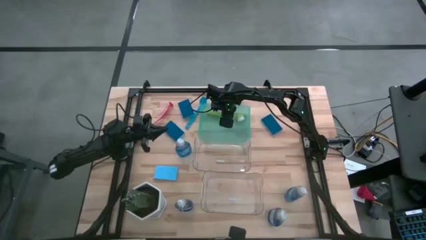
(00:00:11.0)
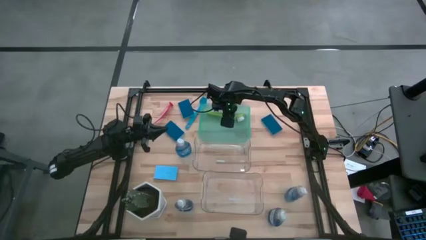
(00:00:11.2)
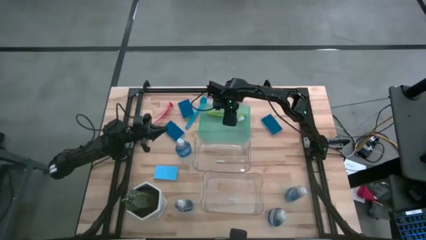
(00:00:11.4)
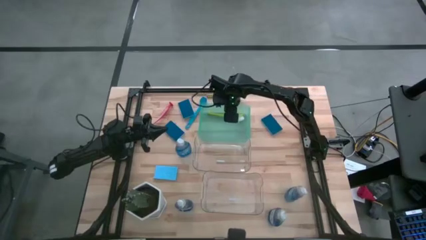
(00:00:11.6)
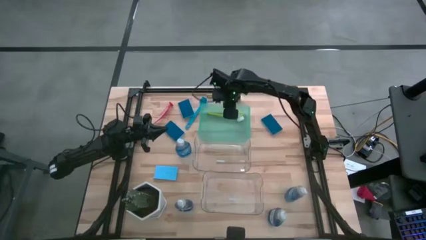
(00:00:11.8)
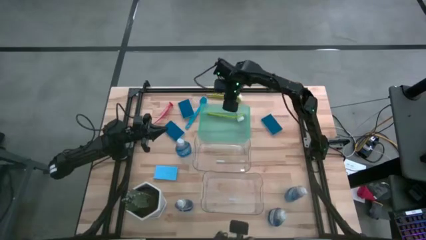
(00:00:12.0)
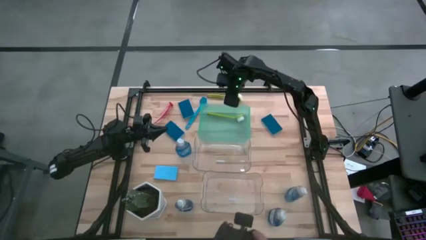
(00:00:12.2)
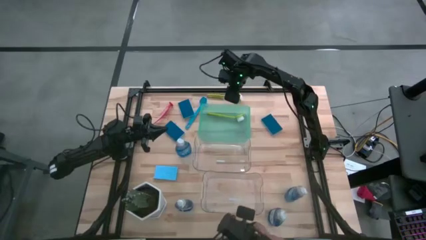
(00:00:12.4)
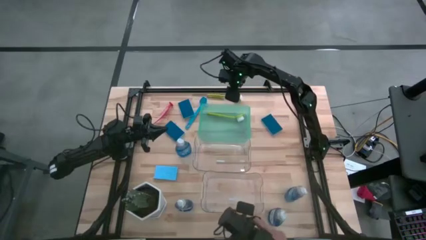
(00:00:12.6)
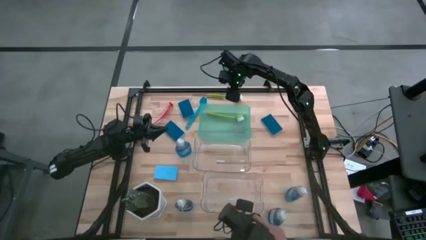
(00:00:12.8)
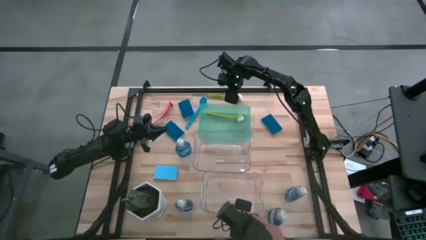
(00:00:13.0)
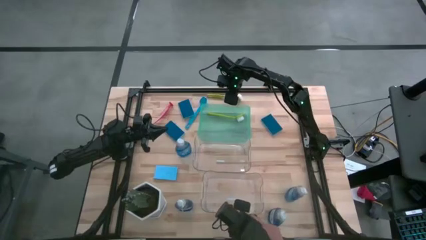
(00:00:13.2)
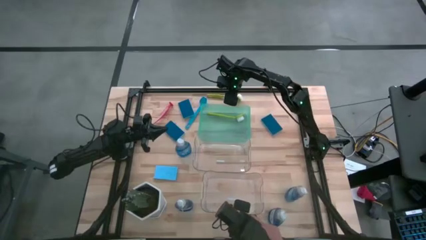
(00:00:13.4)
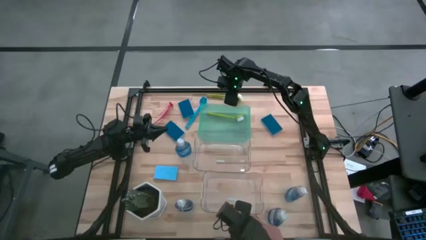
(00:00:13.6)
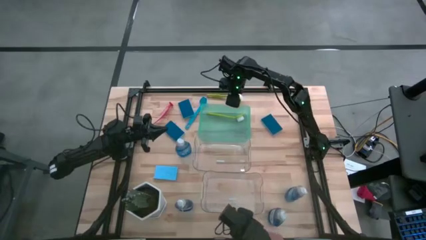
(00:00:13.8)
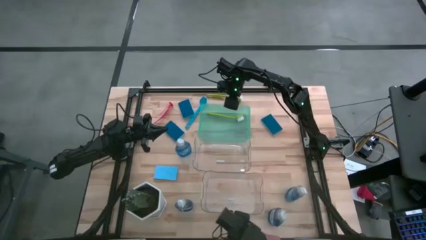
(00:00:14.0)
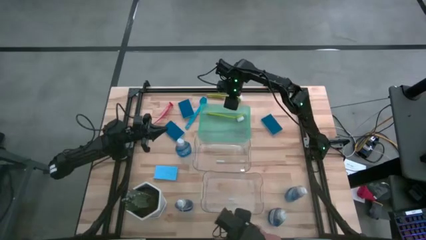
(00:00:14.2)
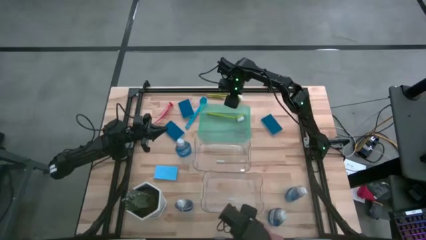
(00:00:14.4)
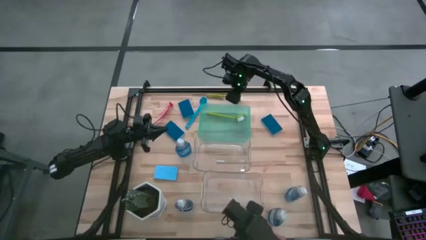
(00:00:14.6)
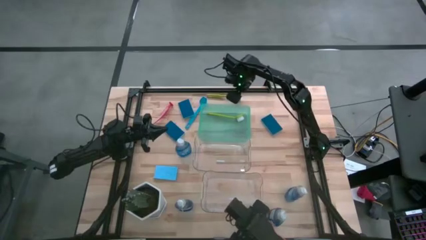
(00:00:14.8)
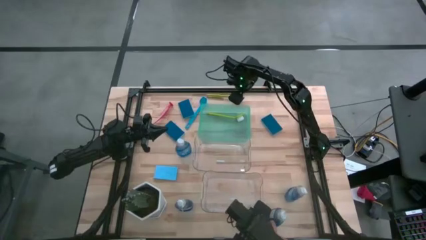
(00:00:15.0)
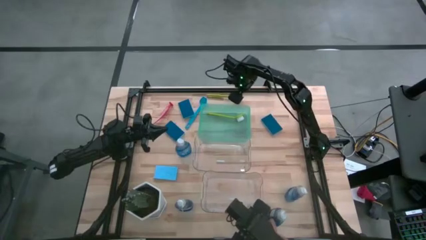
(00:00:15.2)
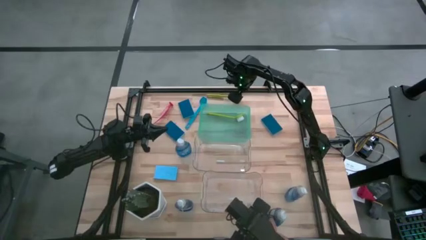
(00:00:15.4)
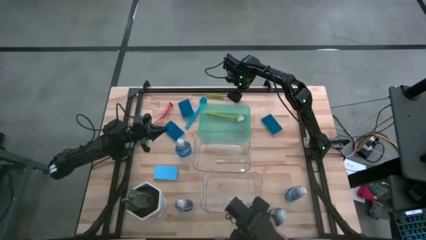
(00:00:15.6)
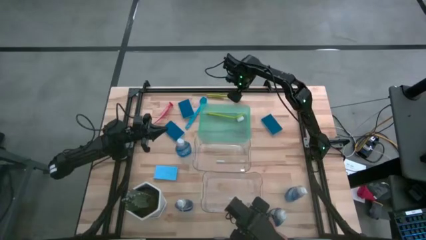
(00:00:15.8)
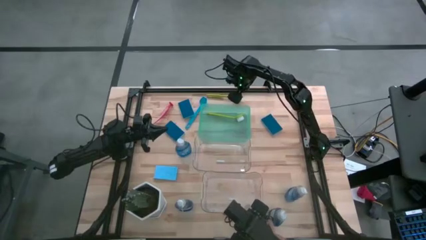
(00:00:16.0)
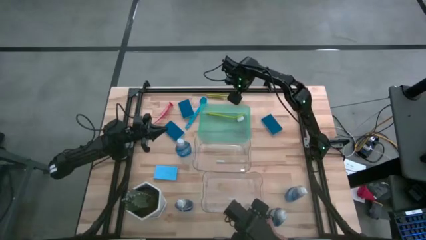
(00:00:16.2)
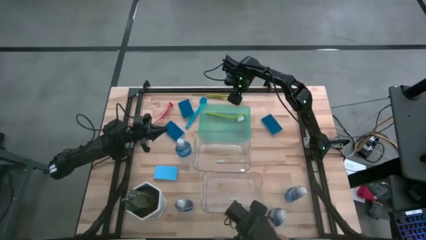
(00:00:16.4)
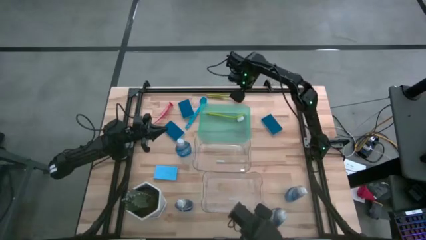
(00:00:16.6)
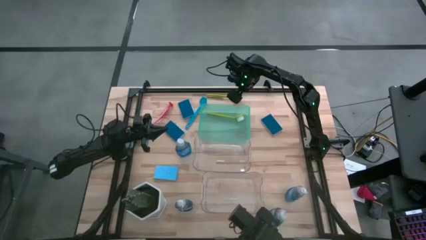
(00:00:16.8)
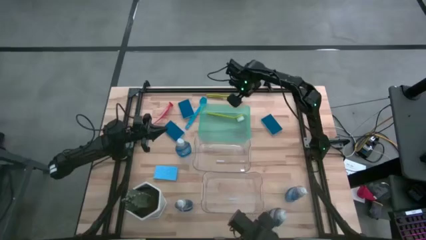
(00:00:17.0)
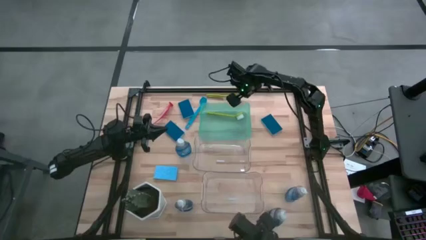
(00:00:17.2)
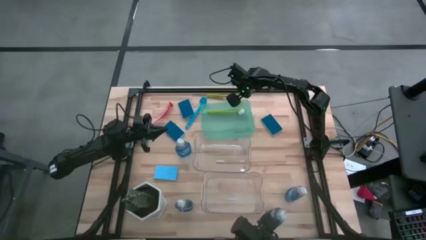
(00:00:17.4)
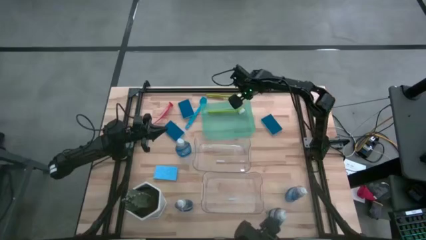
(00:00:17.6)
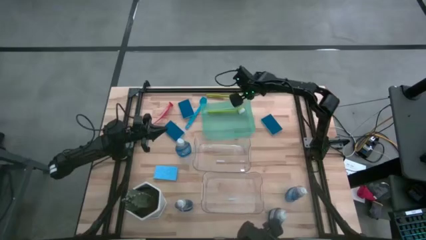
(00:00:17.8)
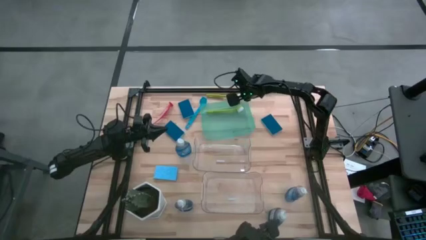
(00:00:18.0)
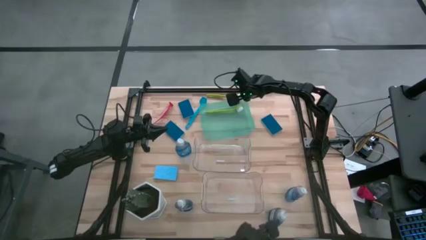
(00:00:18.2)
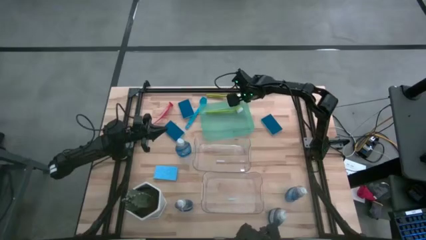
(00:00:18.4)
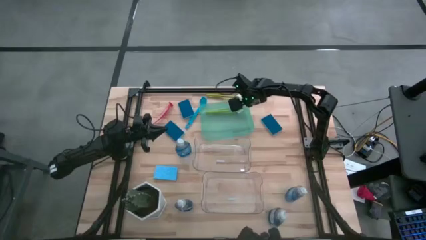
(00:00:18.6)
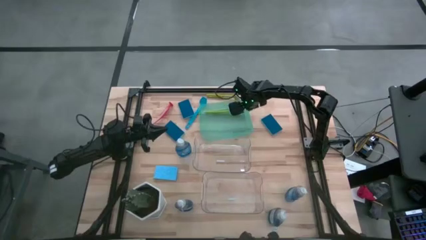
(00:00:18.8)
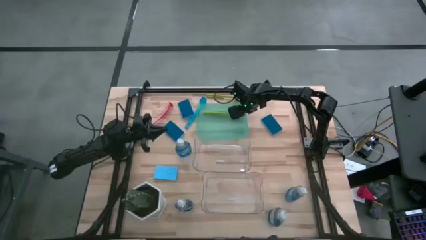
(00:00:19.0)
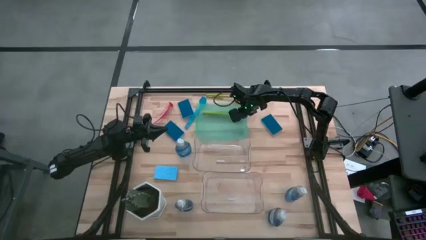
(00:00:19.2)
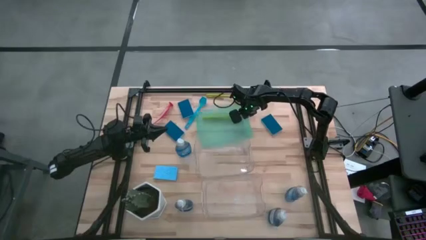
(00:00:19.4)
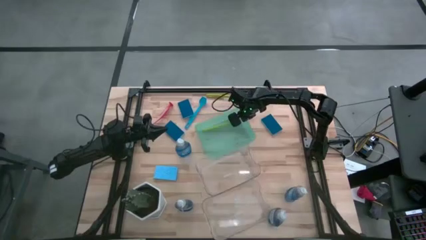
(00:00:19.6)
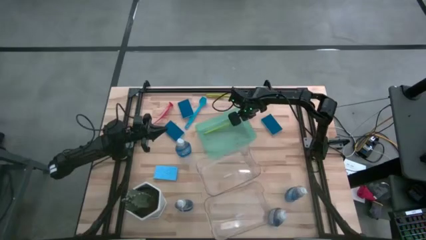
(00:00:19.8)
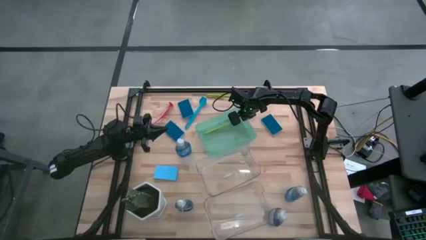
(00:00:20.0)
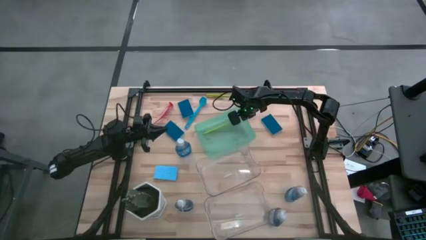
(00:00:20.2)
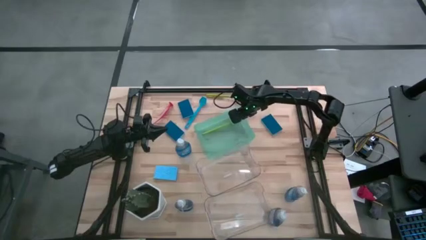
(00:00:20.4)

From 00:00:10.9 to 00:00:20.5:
Task: Pick & Place Kitchen Sink Supplies
Adjust the teal bin

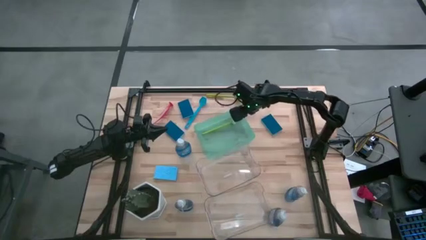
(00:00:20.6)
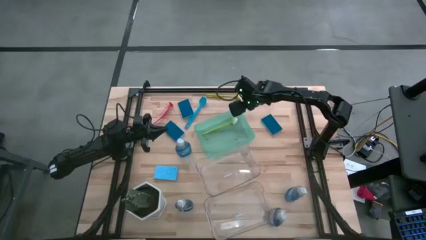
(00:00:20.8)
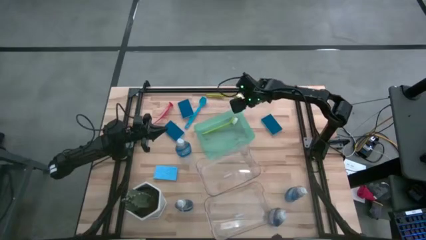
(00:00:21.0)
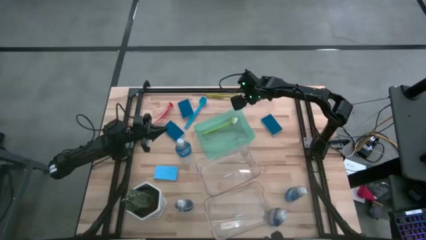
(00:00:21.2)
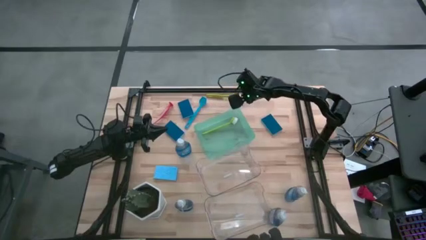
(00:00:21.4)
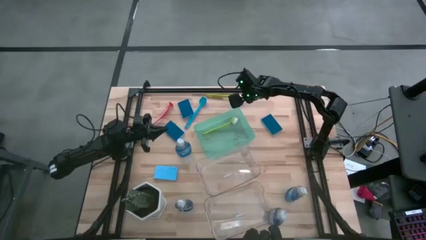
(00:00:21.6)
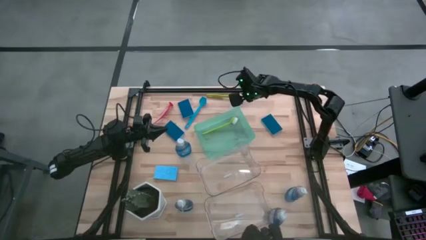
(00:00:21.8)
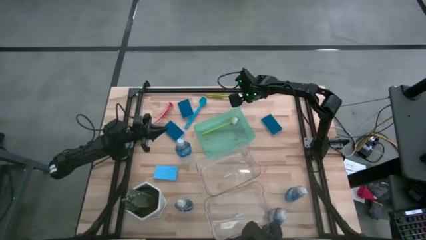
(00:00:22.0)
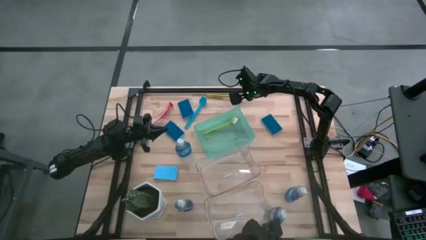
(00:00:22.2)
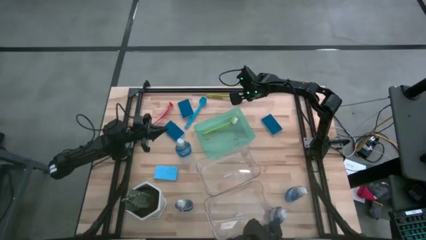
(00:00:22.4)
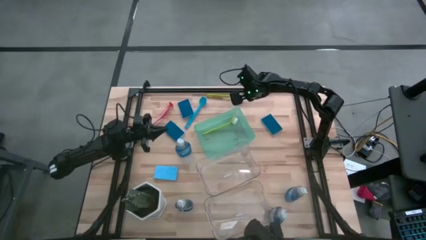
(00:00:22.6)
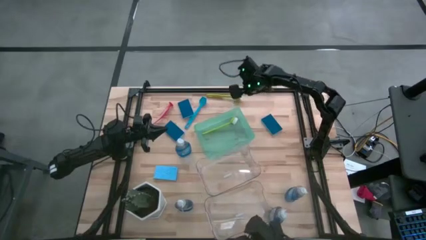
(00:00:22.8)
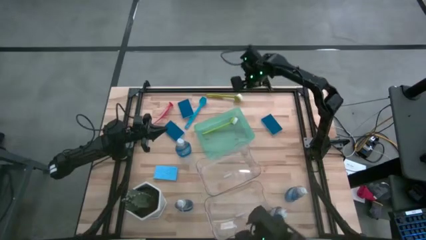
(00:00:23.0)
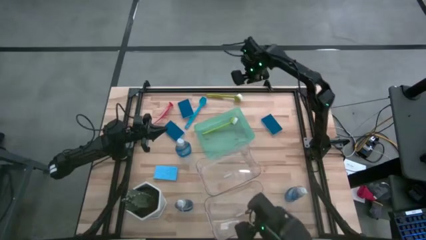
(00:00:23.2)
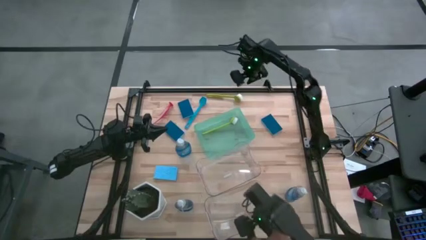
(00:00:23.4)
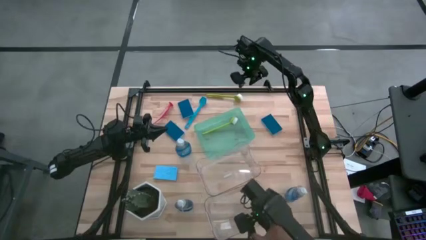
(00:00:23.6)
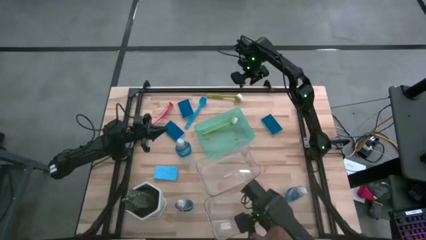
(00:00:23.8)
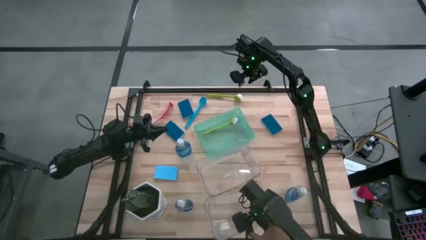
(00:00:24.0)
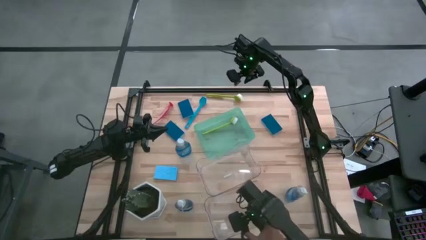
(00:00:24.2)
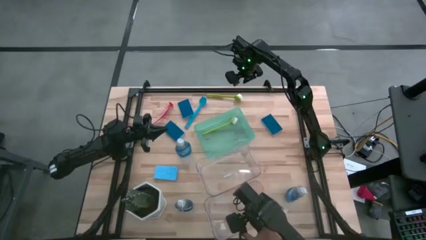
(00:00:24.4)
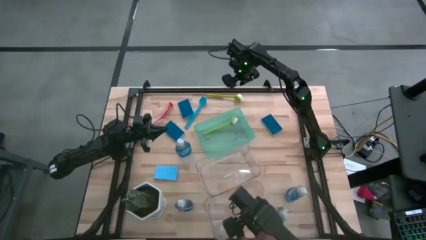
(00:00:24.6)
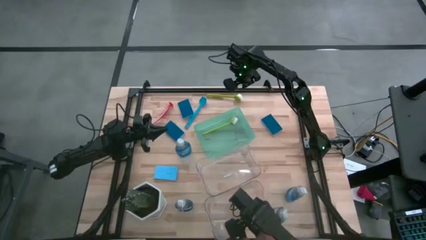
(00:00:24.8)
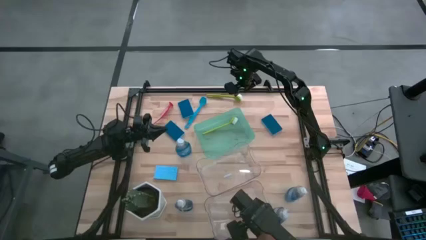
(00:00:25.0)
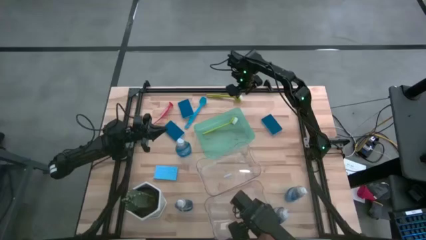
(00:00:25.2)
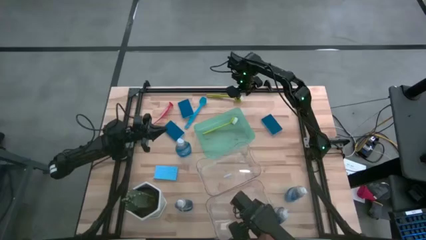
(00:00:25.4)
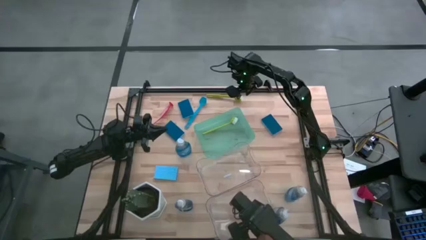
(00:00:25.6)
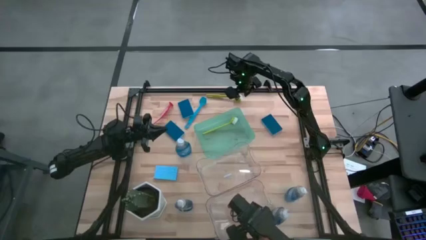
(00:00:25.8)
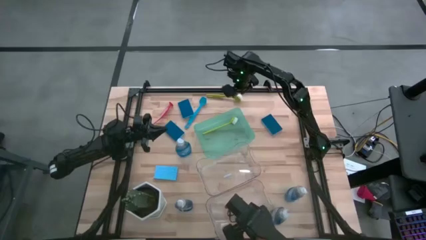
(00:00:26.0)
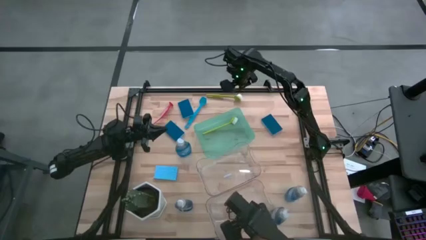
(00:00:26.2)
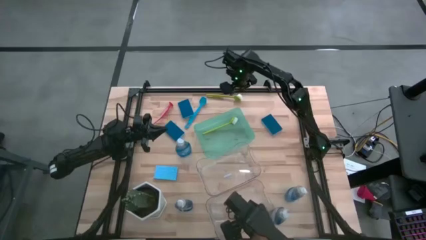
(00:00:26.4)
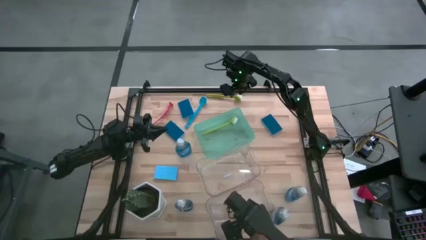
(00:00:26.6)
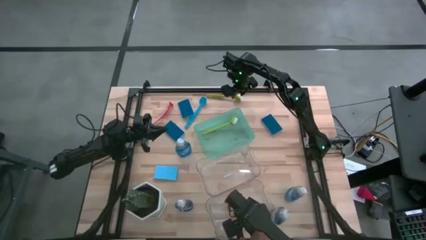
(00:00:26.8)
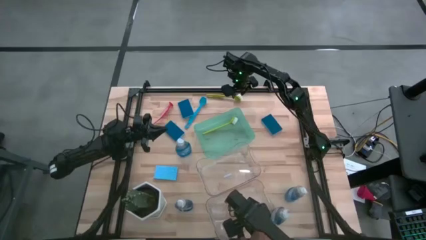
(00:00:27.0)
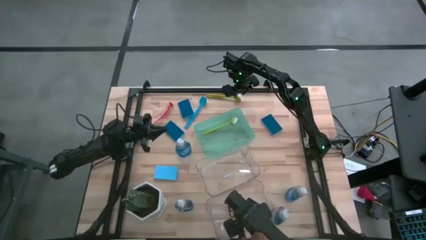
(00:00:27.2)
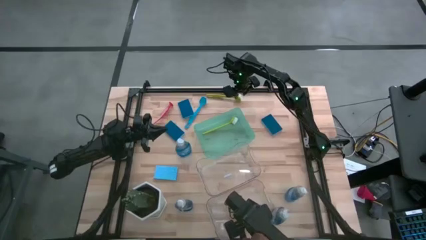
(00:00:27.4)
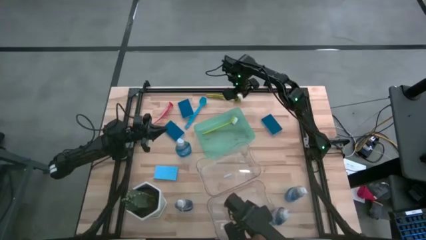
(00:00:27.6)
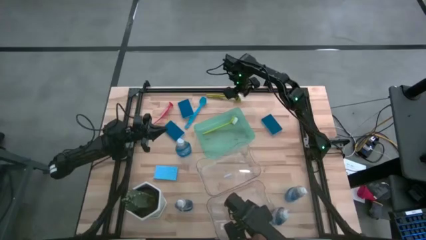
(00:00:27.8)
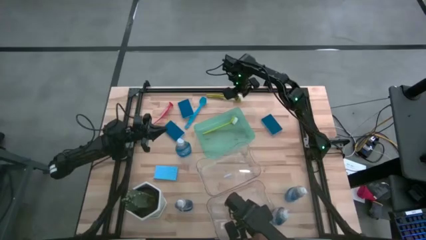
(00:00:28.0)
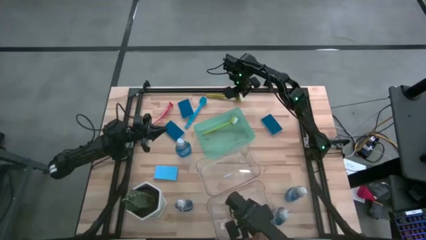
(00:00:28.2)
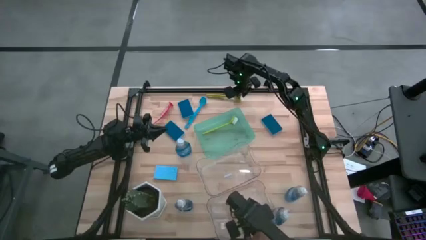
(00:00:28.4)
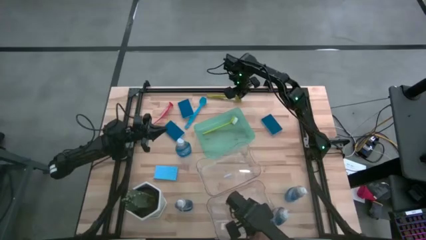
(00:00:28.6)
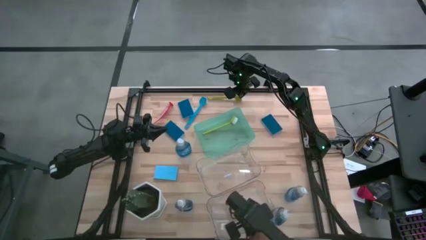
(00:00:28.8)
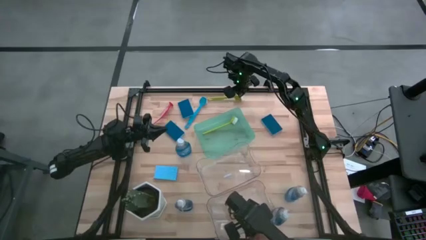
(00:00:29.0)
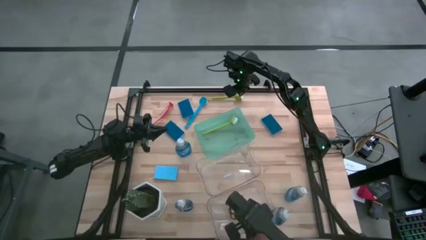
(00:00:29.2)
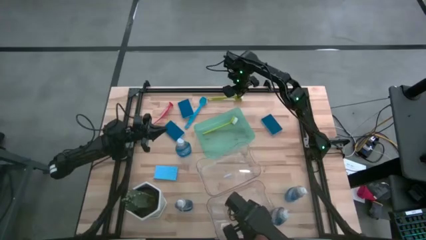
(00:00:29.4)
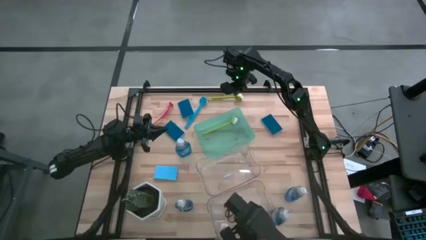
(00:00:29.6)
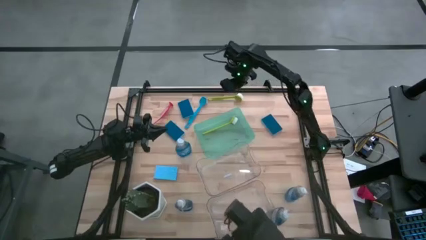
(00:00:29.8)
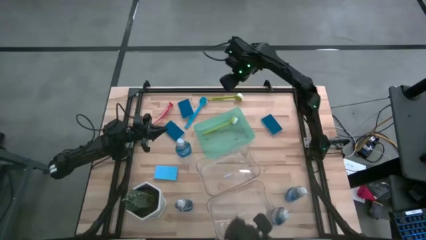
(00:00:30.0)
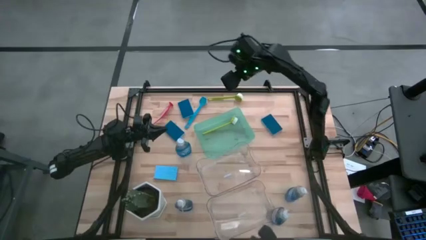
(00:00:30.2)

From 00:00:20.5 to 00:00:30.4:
Put the green dish brush into the teal bin
